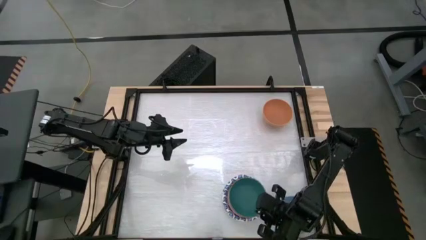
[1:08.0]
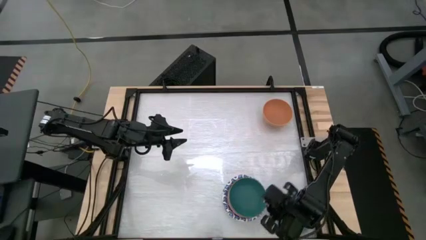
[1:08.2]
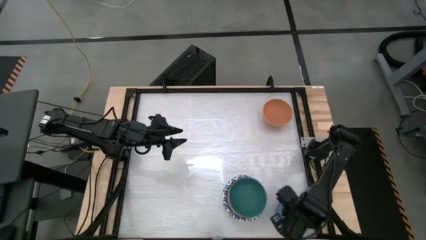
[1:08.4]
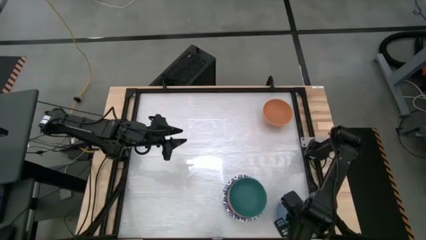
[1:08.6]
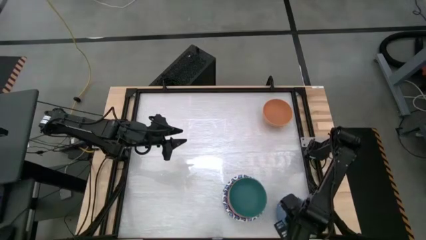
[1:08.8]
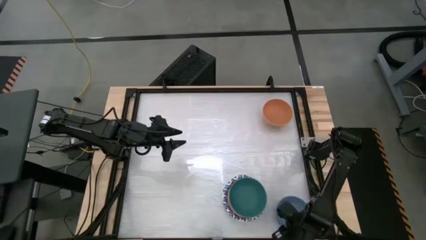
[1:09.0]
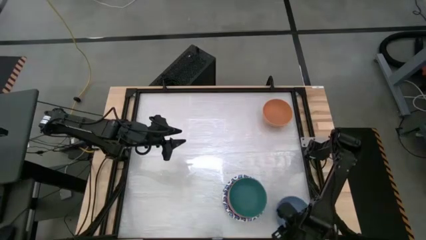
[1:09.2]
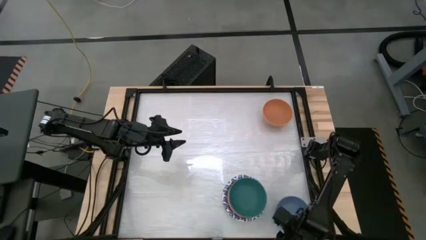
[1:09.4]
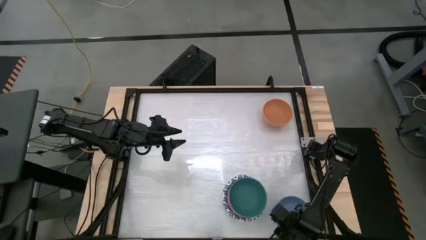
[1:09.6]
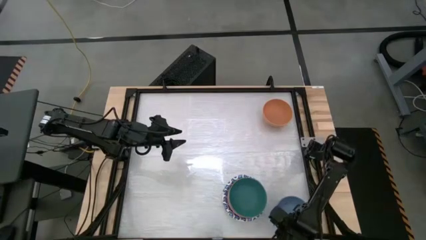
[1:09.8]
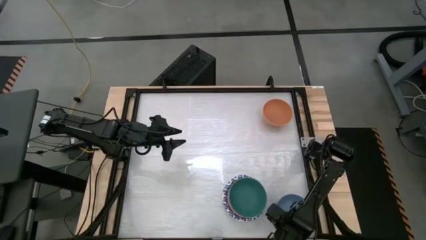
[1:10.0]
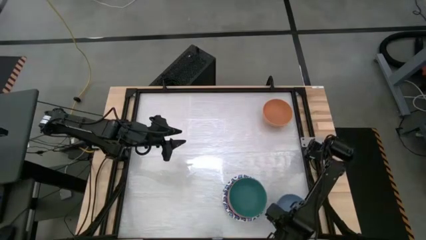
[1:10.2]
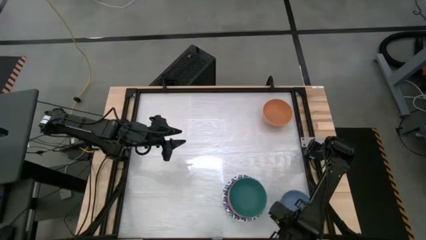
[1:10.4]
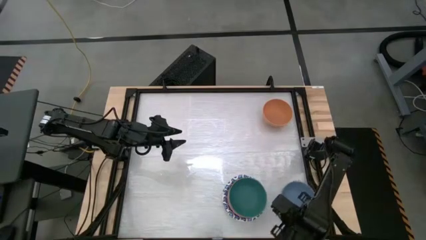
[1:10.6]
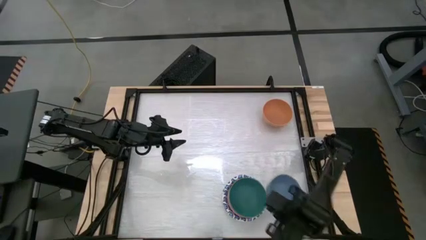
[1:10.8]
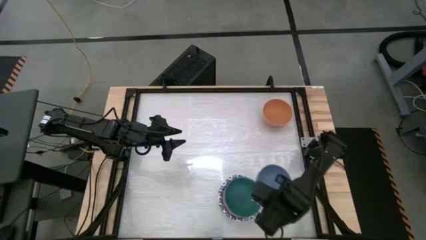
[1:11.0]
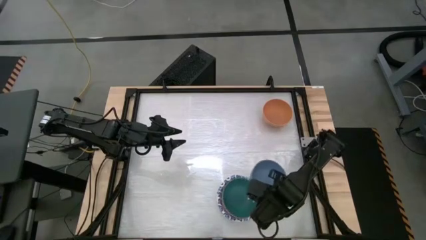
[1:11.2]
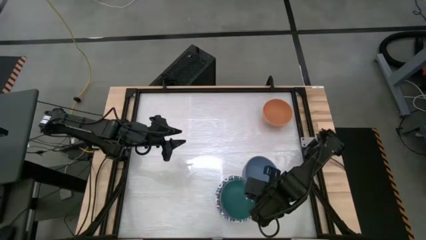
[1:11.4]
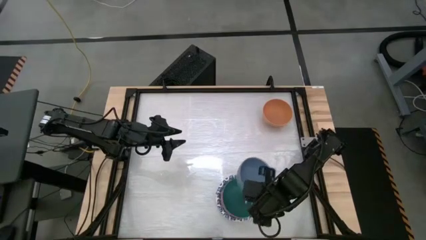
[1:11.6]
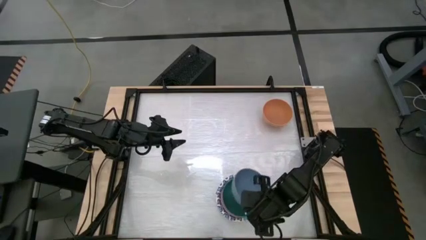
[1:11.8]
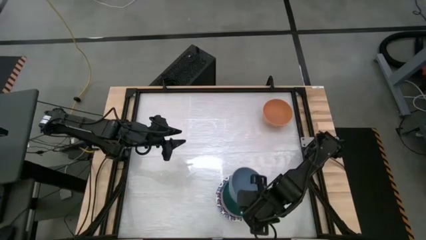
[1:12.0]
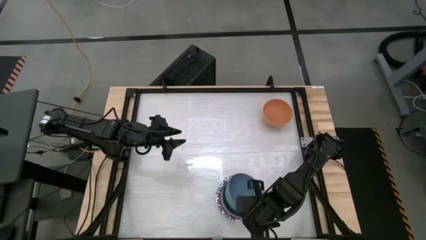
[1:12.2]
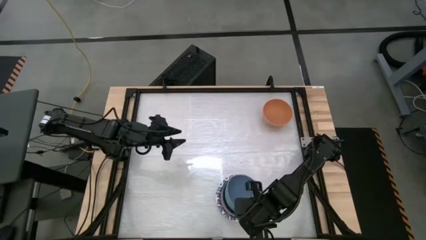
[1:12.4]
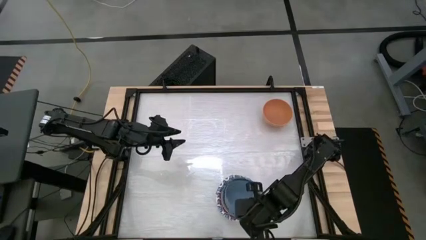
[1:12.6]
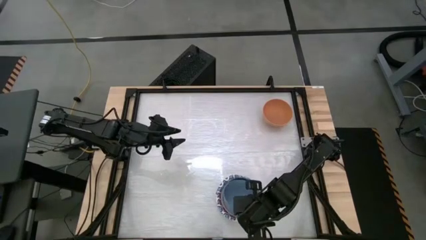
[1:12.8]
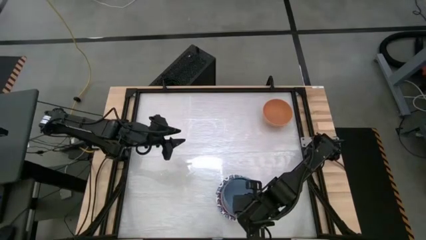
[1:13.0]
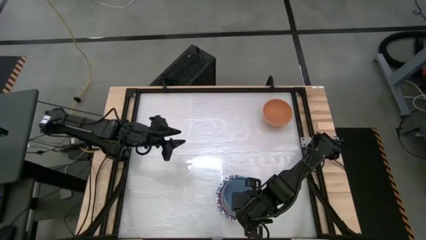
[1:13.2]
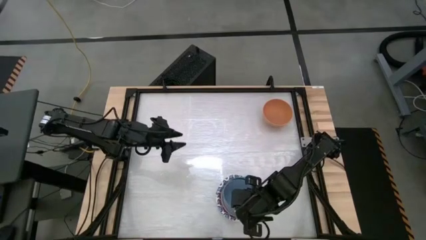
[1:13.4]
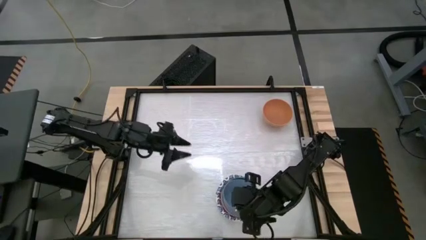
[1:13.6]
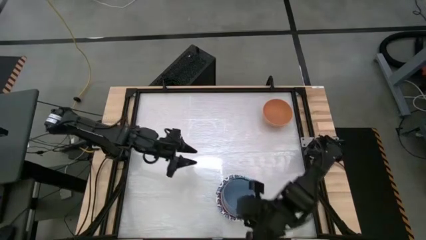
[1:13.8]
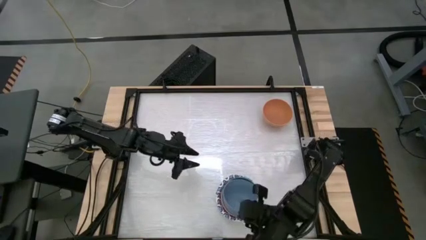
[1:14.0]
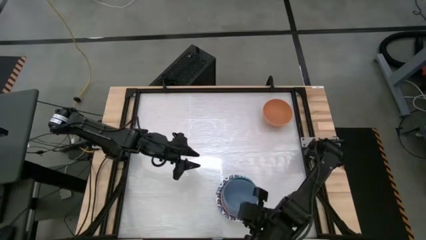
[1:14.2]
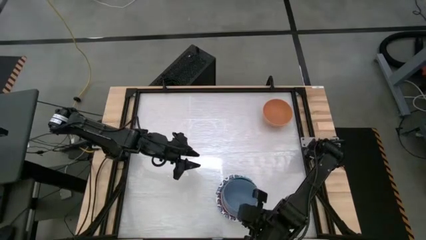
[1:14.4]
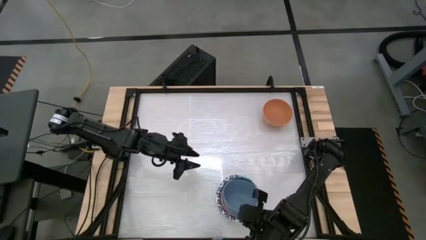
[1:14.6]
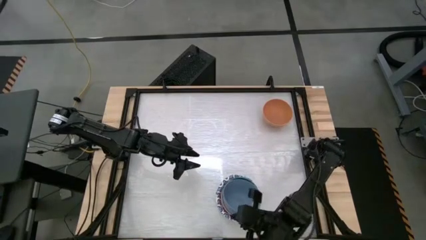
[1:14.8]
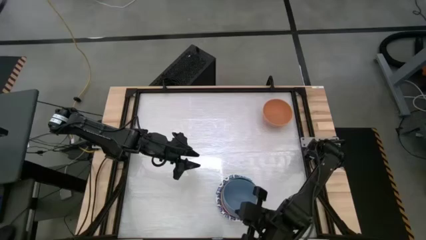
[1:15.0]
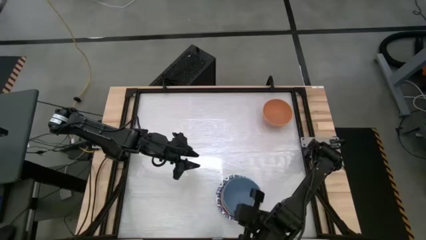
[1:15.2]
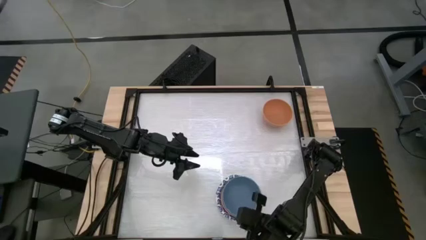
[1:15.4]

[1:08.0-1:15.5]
Stack the blue bowl on top of the green bowl

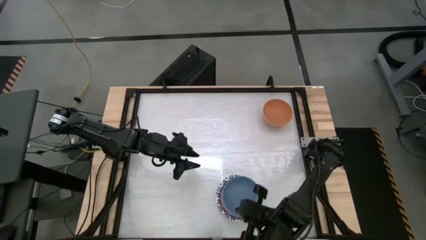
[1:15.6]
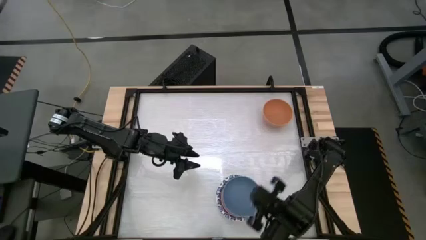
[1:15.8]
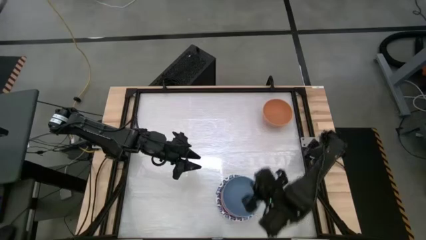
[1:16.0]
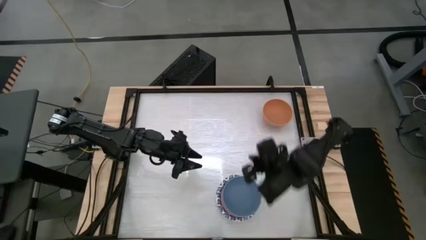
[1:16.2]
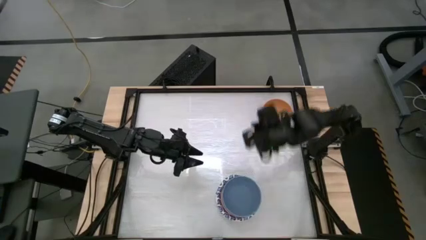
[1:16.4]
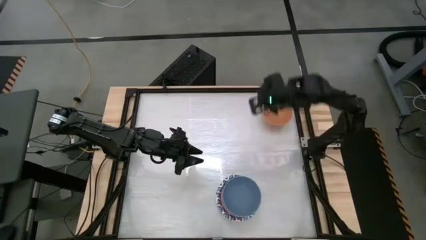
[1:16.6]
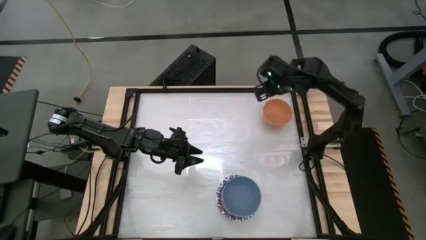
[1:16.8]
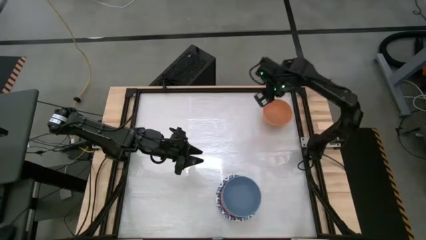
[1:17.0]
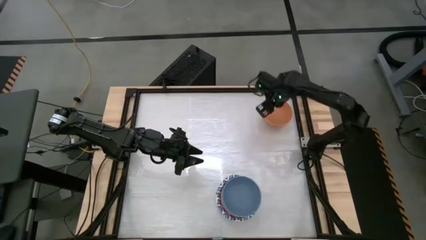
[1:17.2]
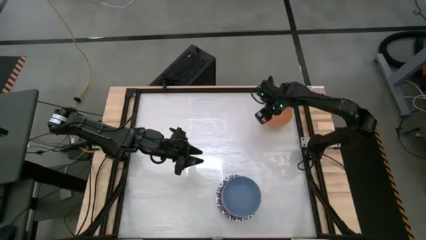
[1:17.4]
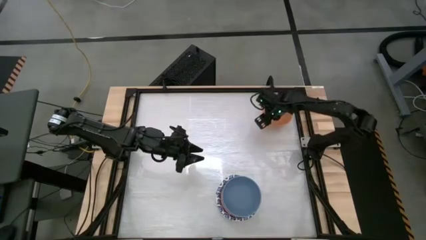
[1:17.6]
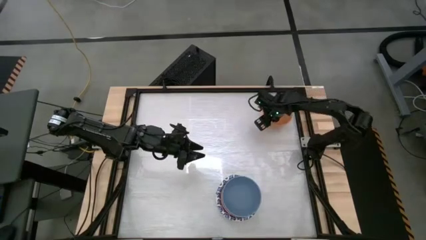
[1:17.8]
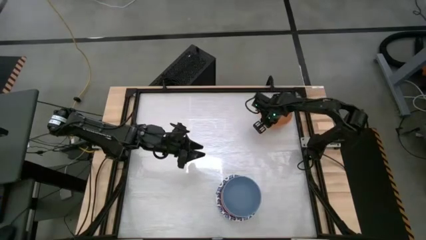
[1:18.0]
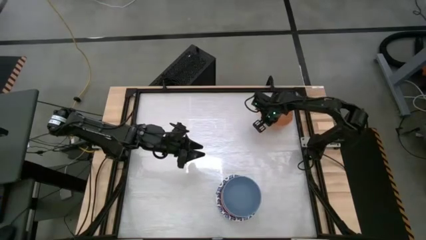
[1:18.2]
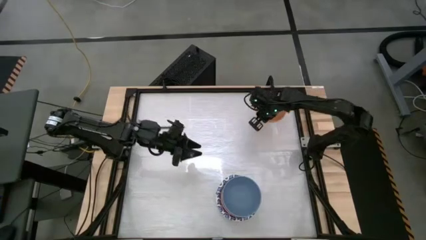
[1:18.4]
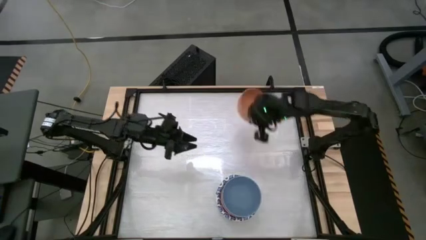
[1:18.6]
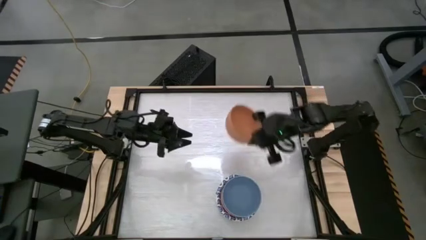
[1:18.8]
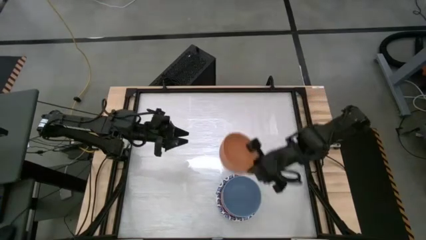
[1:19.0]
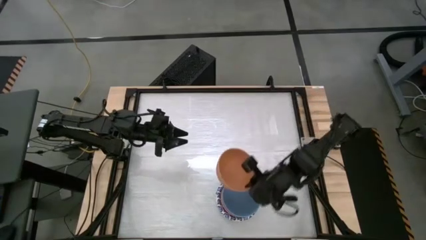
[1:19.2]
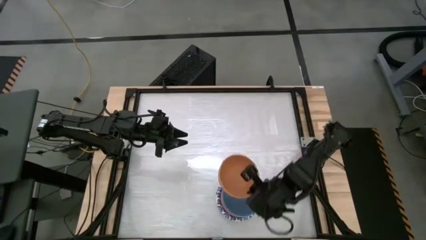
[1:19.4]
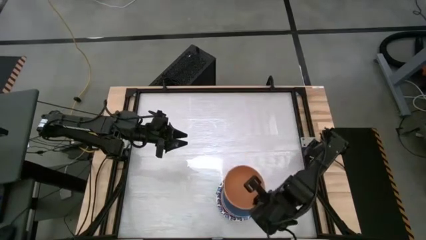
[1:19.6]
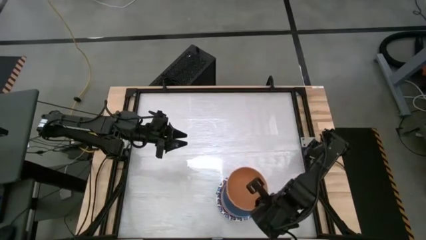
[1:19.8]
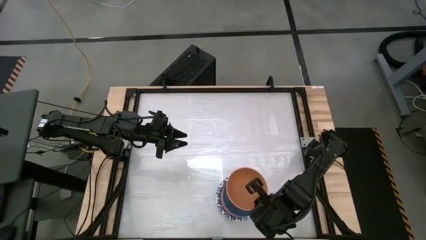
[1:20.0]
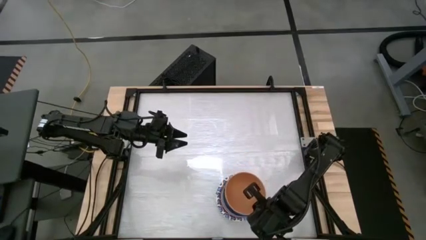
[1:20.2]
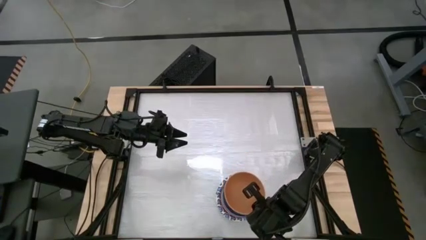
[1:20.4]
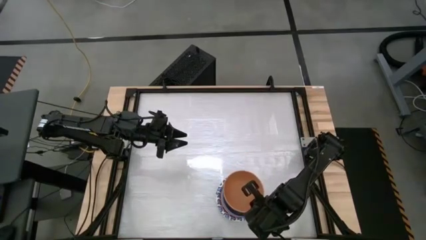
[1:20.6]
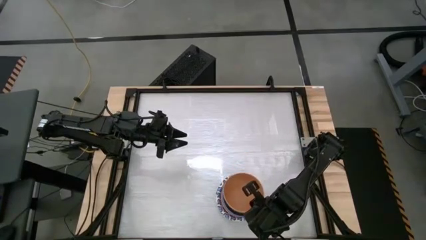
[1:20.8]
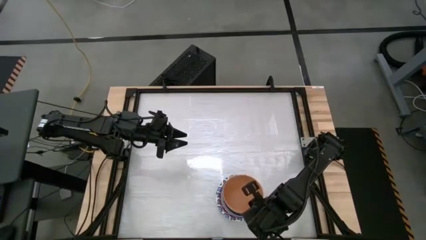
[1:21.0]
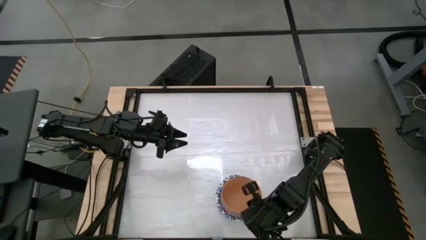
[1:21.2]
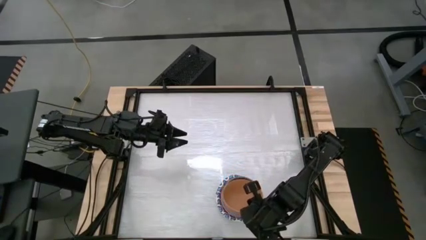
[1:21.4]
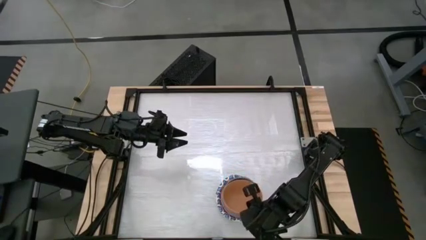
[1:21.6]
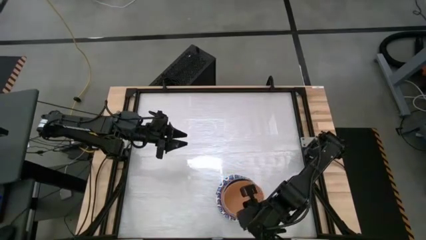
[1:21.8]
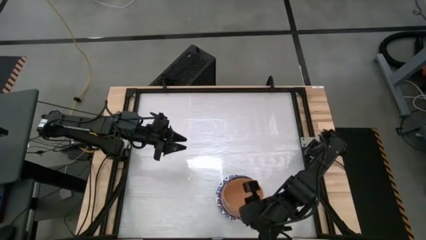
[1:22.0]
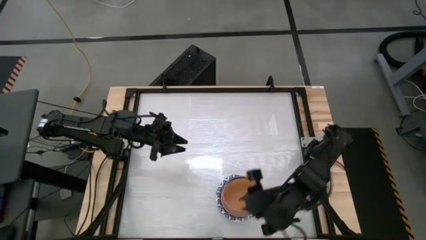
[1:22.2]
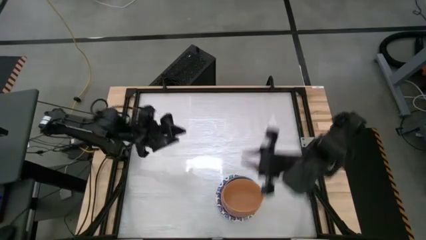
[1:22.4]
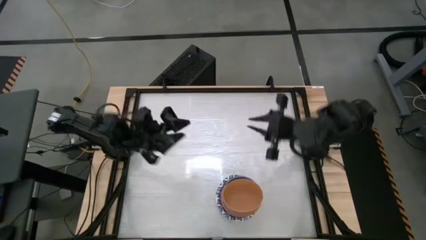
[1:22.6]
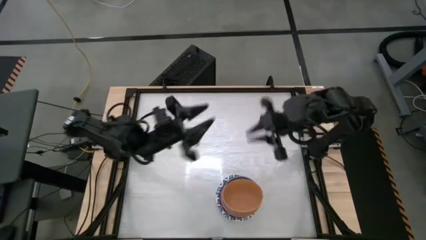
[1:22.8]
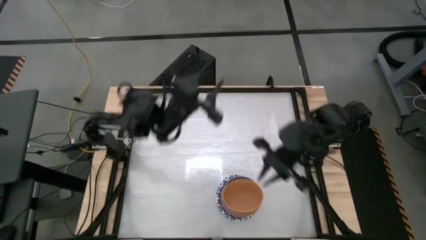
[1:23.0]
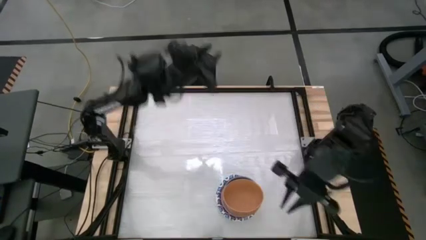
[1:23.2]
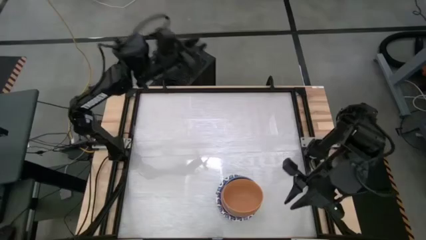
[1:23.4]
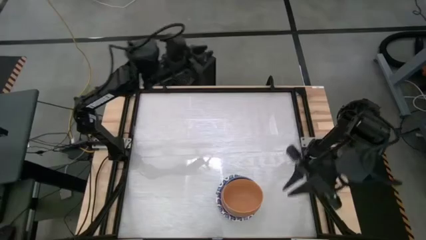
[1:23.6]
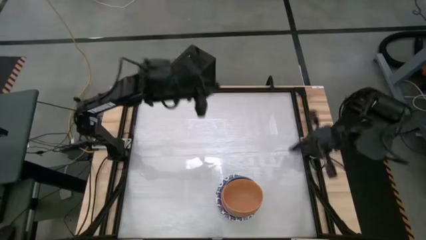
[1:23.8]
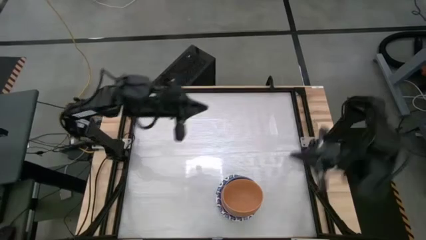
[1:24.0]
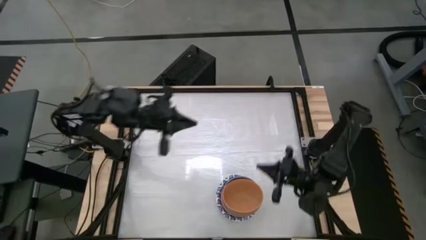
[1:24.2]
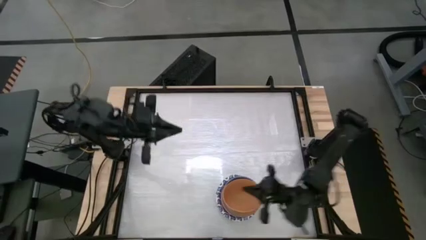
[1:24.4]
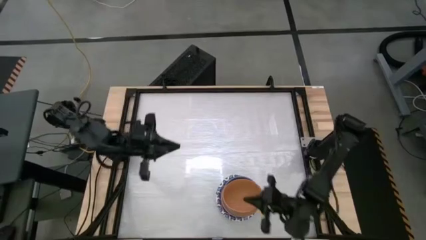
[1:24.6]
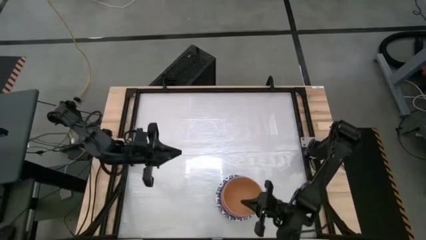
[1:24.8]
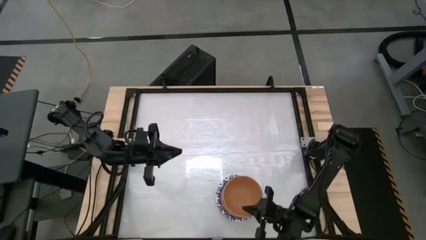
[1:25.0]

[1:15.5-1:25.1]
Stack the light orange on top of the blue bowl
